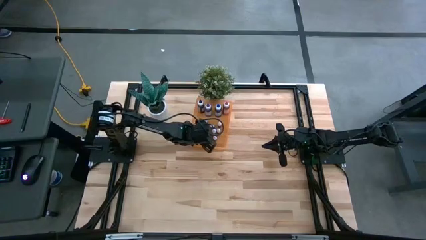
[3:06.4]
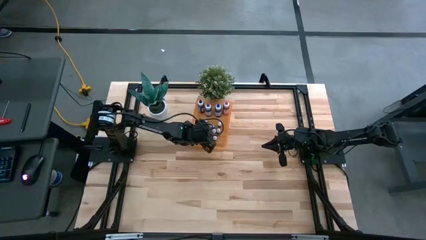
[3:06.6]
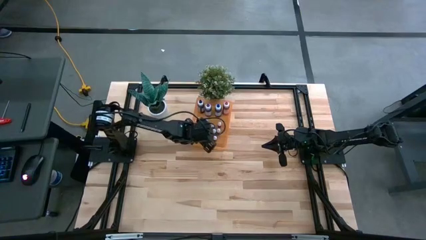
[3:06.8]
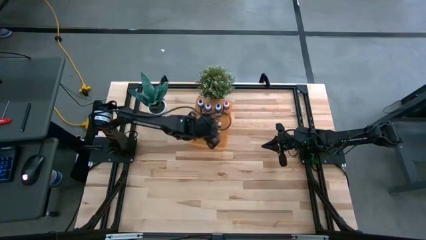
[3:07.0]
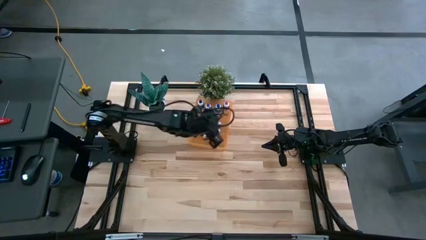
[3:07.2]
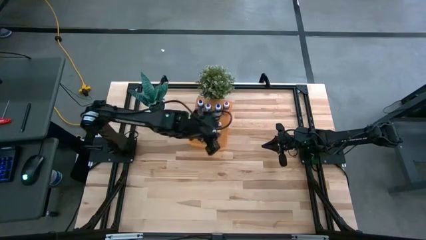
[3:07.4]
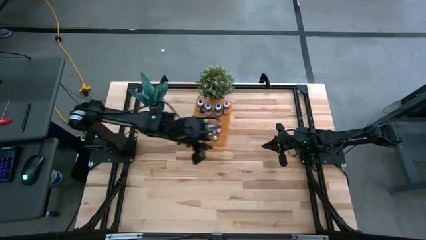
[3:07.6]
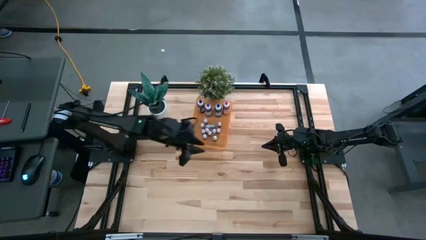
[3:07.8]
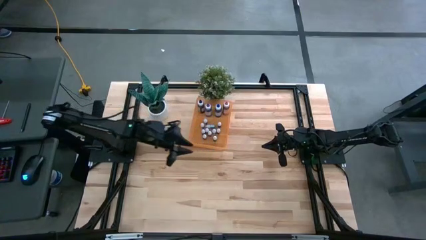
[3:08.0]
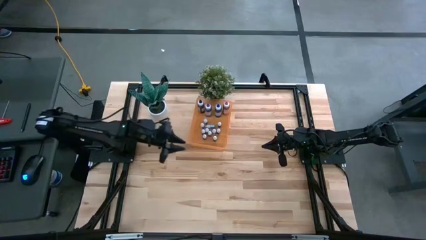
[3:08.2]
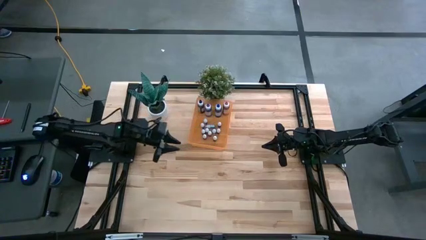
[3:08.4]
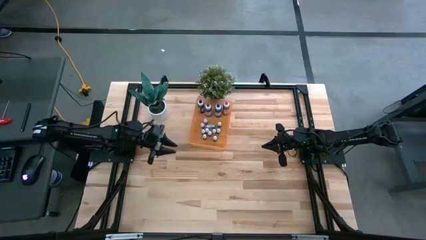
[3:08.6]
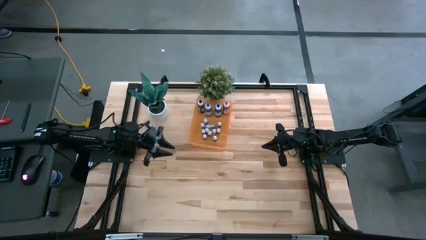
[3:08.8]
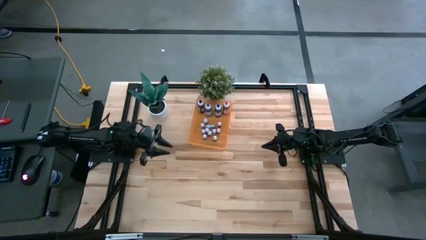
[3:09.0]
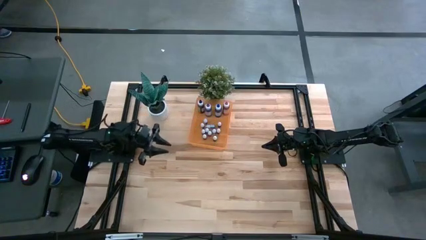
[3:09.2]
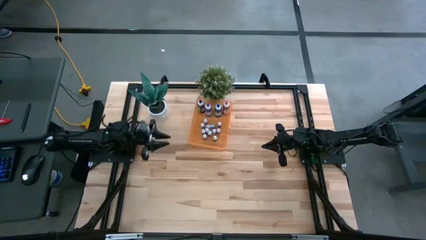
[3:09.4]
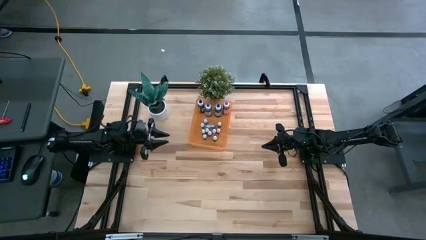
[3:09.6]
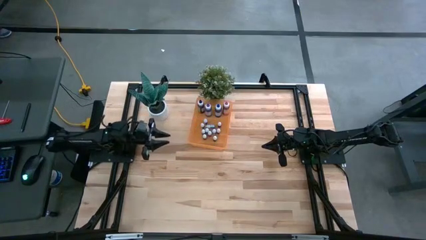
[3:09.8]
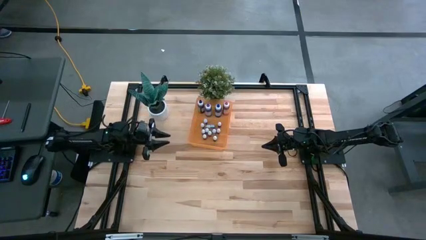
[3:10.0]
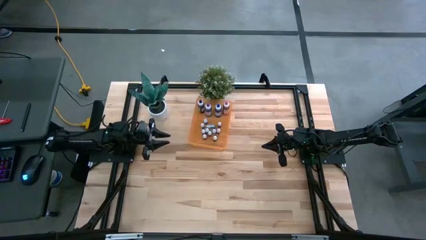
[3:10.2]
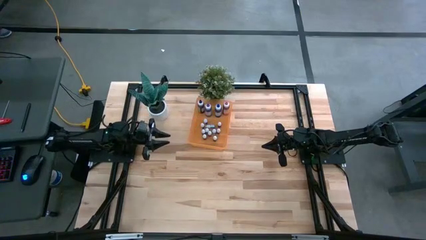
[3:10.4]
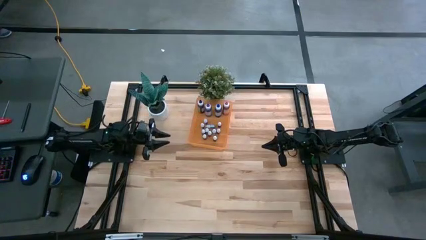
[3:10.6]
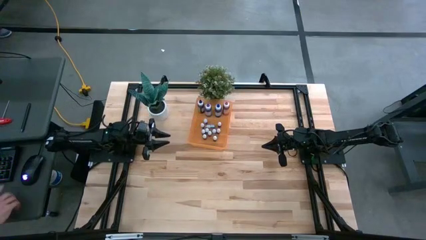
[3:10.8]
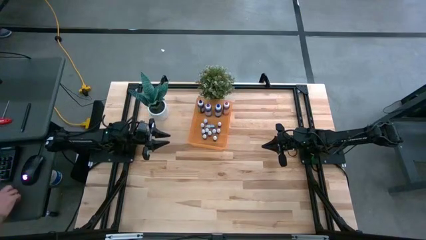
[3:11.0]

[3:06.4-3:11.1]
Task: Pick & Place food coloring
Return to home position

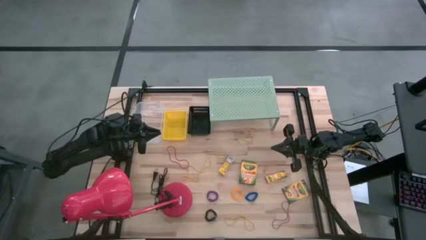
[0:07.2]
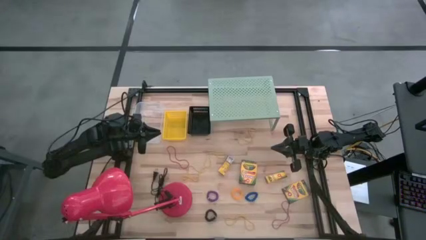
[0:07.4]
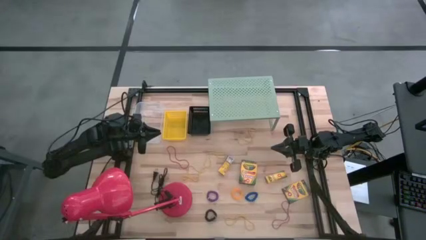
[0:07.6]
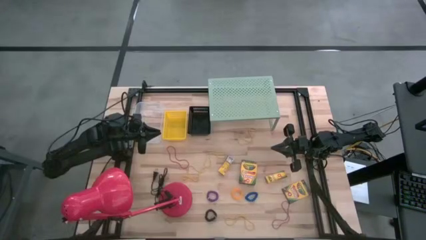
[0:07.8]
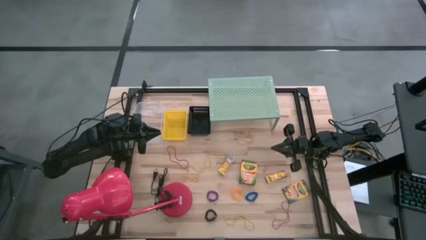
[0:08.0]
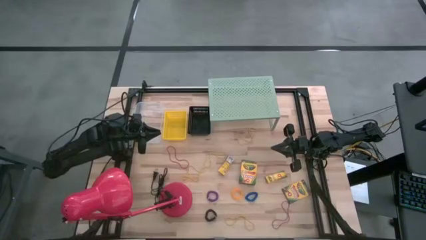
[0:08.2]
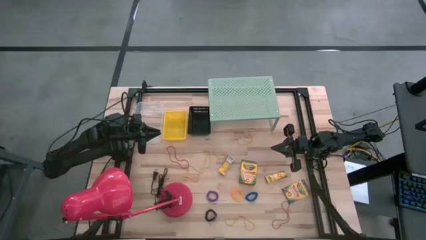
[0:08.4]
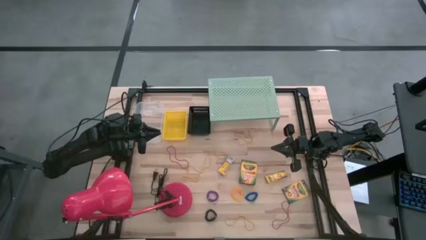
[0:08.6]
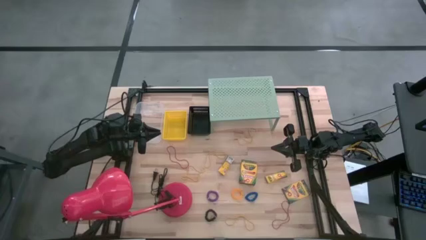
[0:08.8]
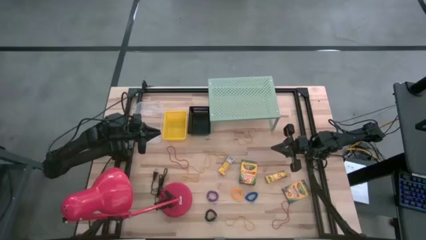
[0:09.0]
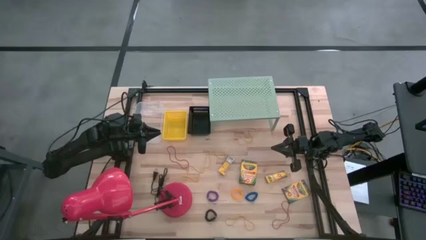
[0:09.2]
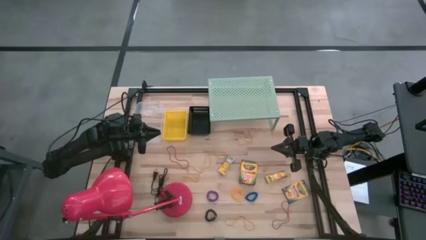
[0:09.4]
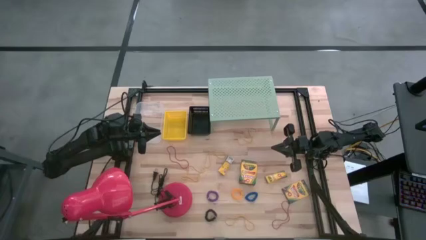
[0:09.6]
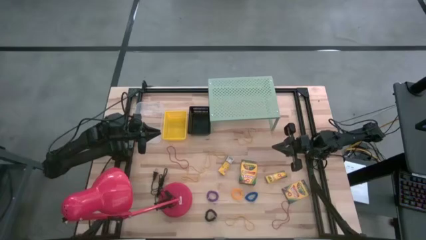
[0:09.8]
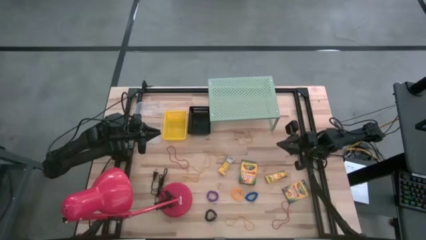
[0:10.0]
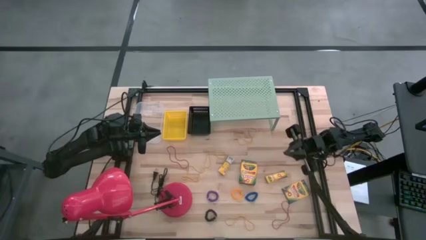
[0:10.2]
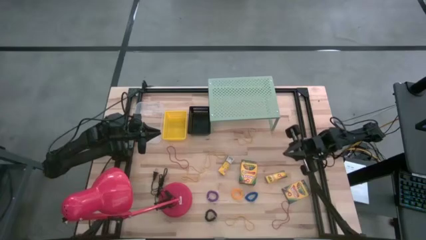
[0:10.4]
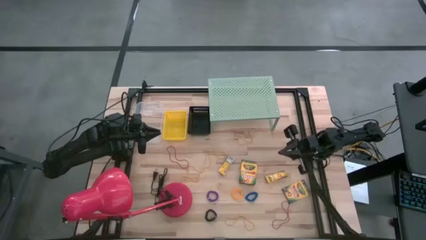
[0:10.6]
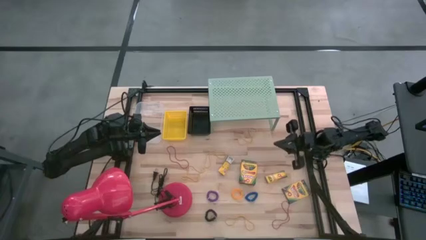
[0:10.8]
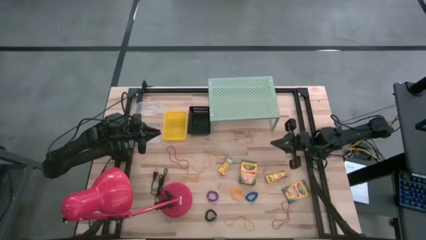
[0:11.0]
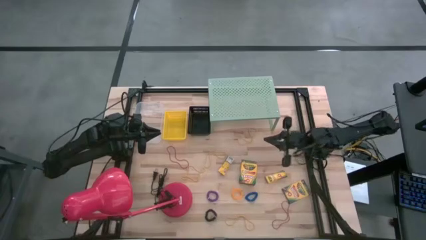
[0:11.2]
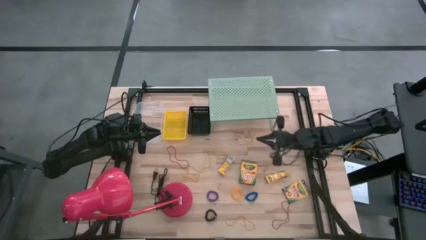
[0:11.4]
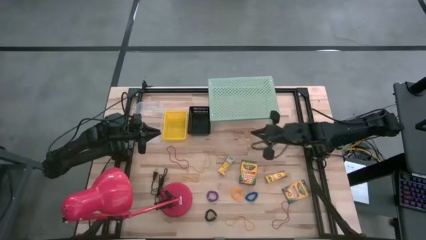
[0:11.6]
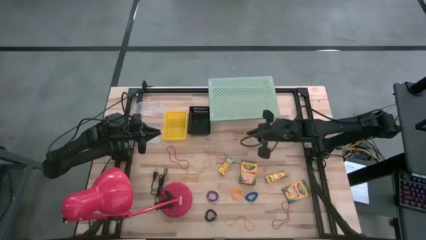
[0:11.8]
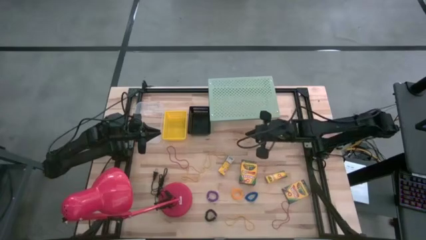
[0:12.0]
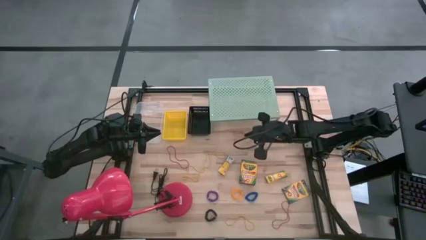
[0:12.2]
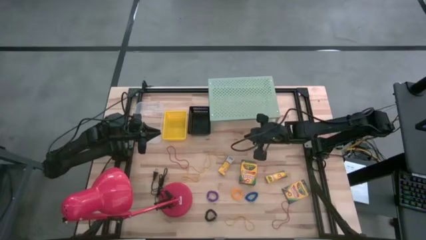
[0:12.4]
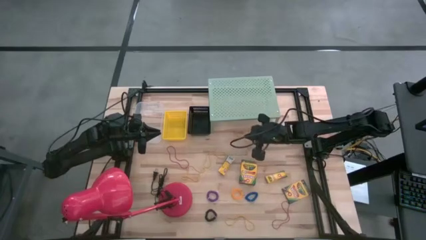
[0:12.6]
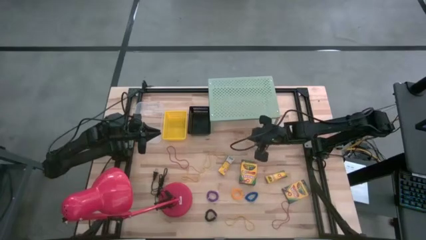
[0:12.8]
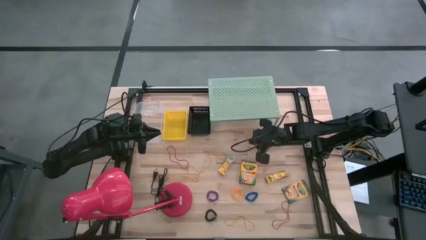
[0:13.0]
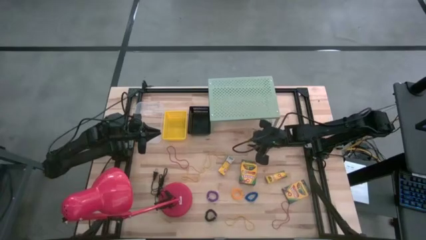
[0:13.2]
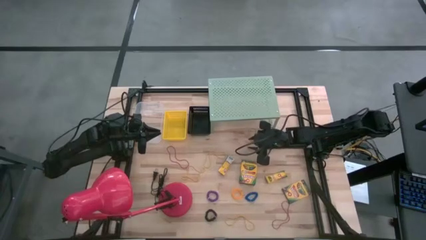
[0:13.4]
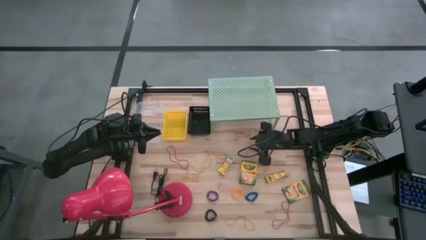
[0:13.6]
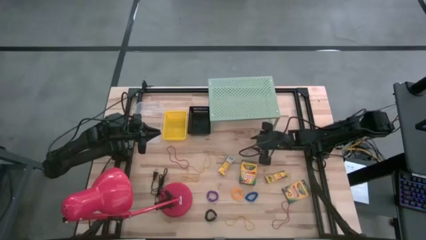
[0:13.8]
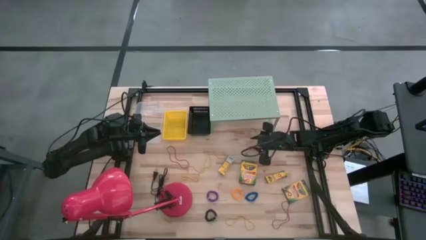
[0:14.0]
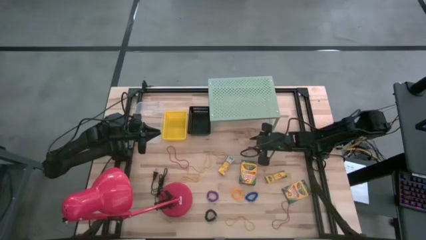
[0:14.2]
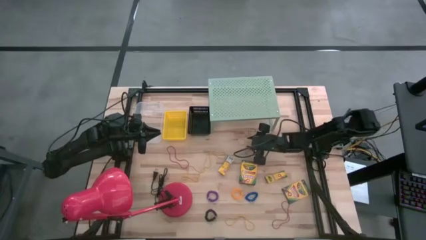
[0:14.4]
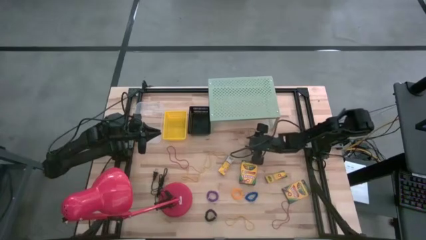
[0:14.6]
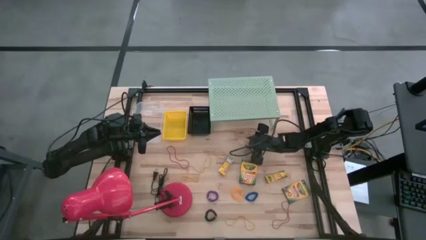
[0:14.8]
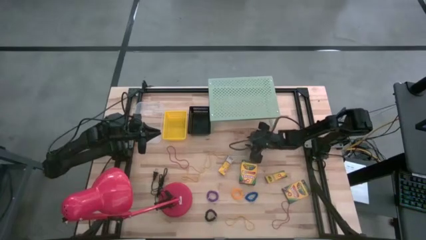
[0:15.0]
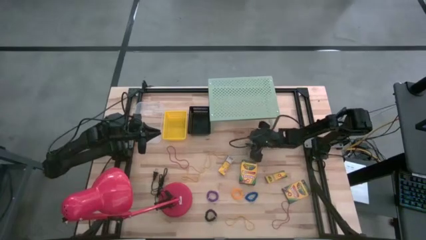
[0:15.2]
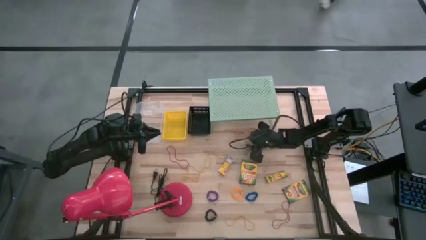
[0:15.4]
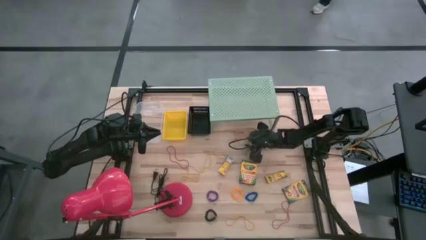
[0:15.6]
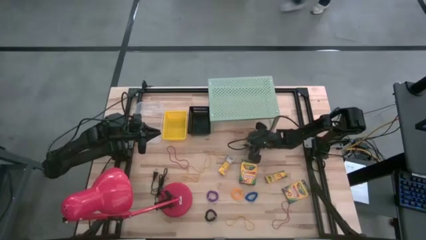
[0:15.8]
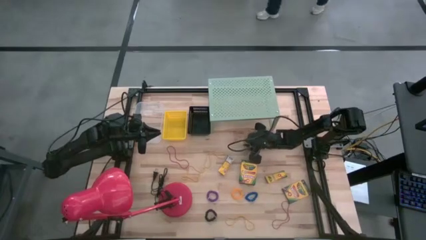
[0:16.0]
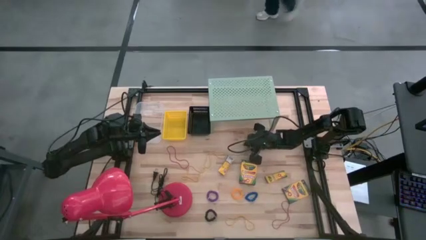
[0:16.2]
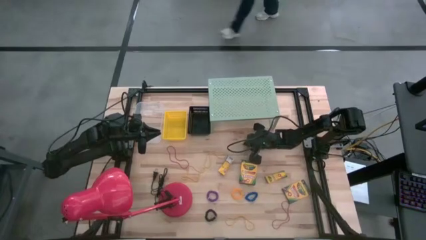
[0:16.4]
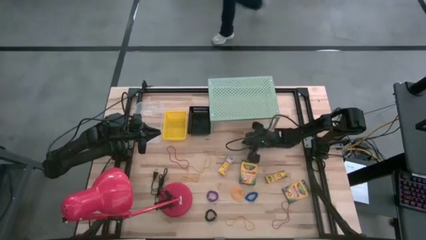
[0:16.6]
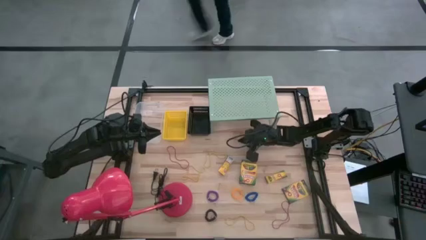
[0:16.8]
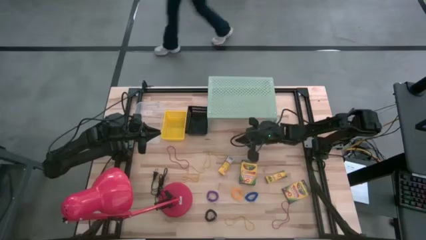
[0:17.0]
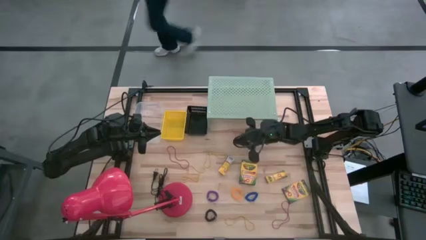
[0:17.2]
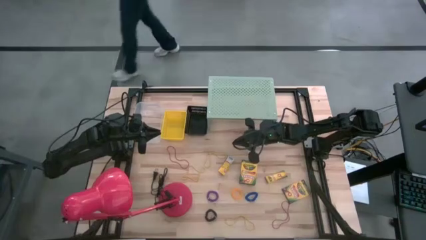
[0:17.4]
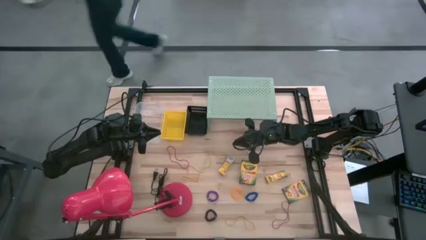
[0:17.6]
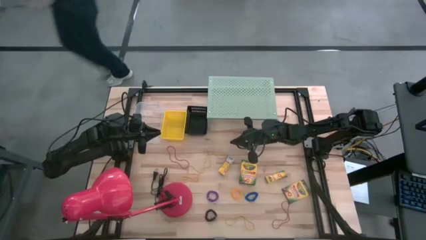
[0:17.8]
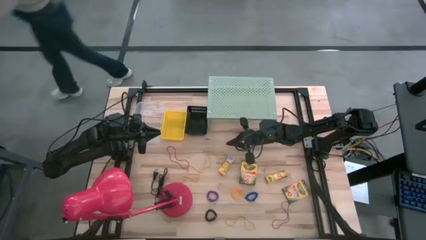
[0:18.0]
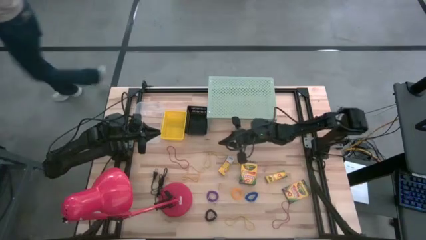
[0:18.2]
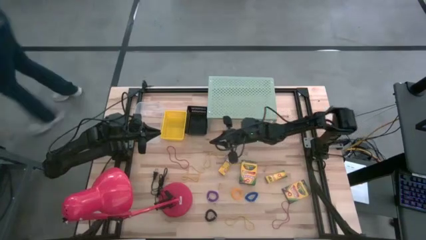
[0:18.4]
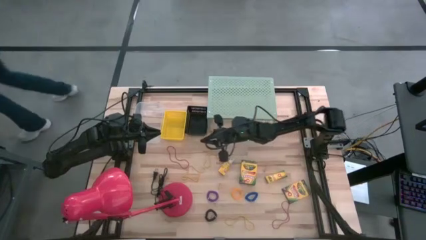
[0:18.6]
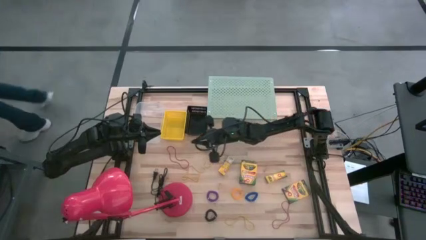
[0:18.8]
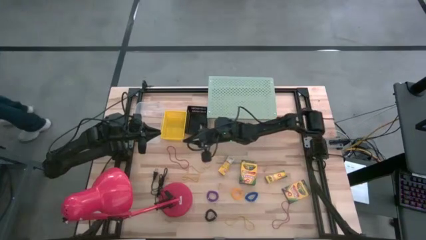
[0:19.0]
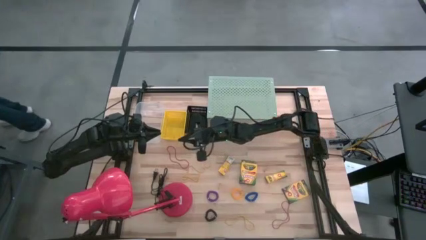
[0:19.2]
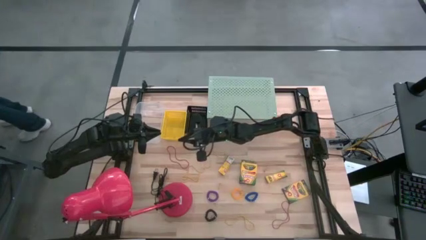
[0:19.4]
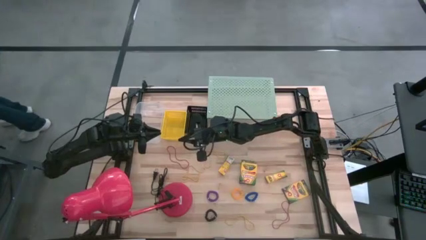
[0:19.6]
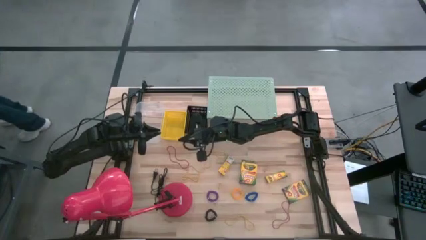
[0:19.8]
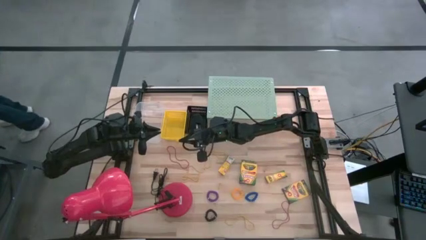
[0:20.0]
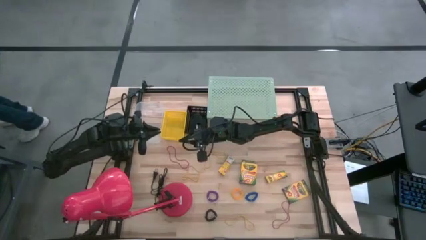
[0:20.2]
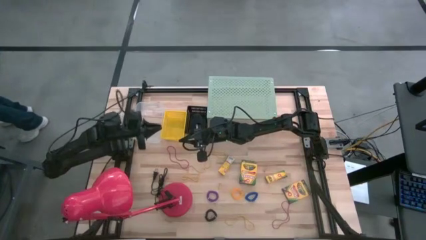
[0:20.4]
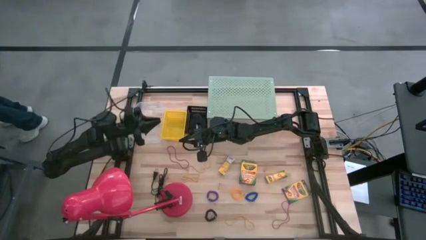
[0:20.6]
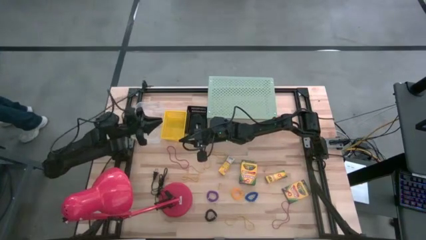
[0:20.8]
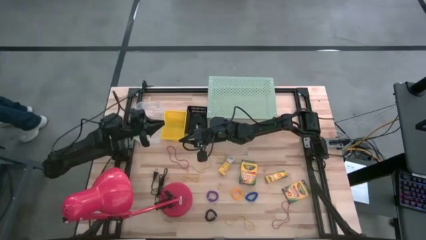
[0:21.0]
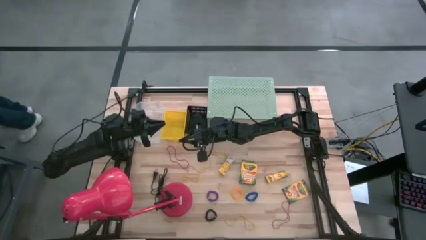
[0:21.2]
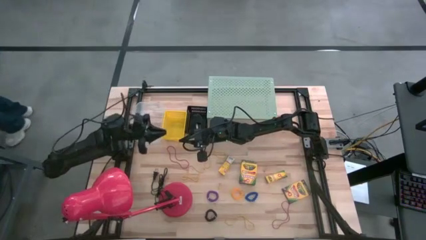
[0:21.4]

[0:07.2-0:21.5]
Task: Pick & Place Office Desk Supplies
Put the yellow rubber band into the transparent bin
